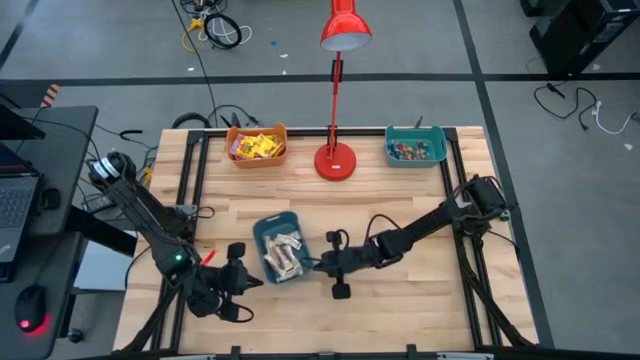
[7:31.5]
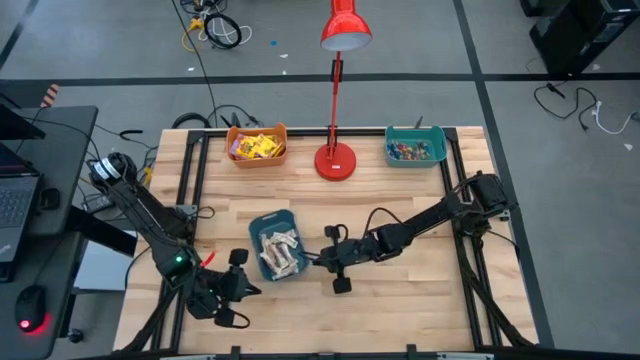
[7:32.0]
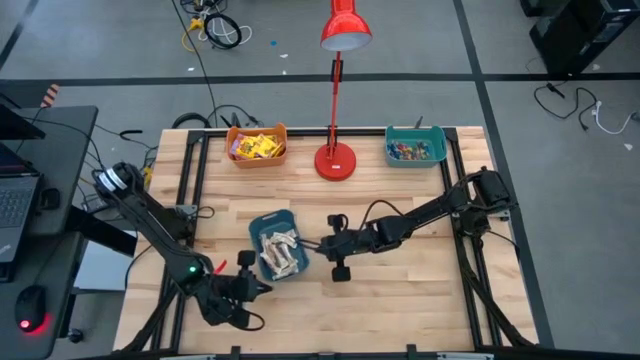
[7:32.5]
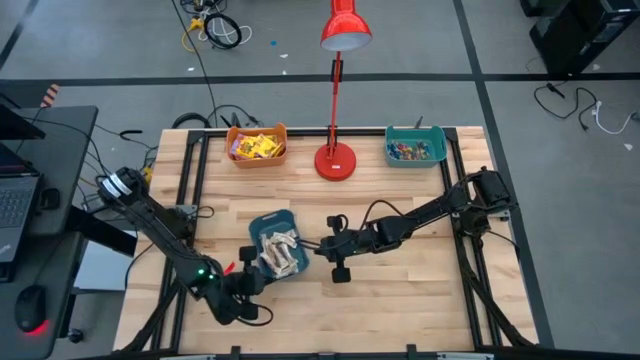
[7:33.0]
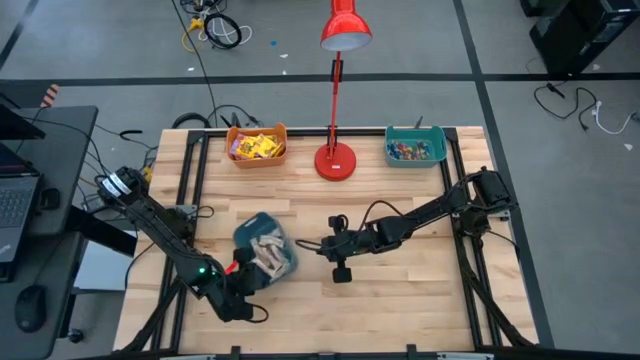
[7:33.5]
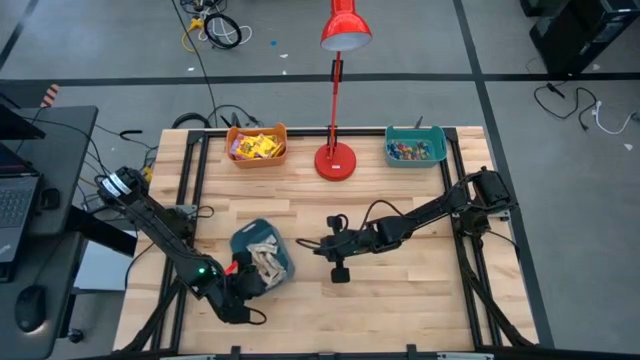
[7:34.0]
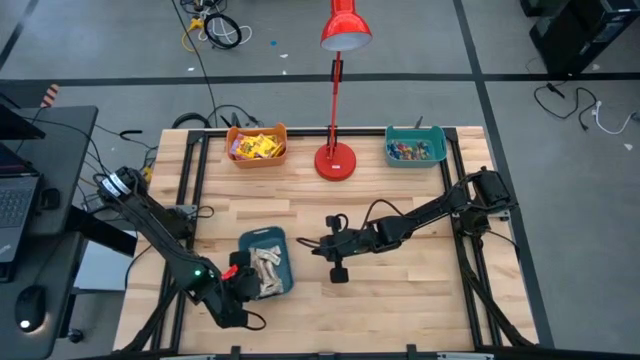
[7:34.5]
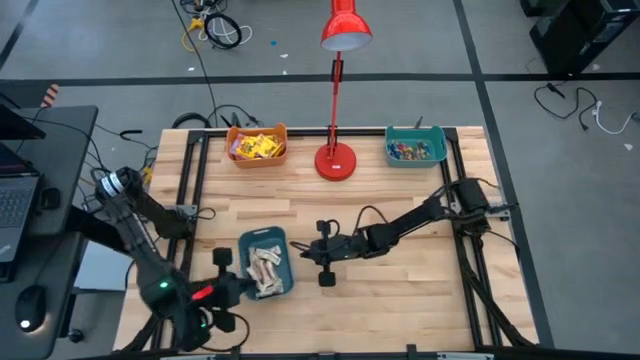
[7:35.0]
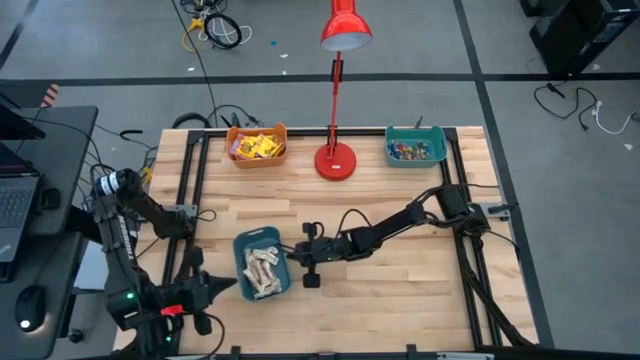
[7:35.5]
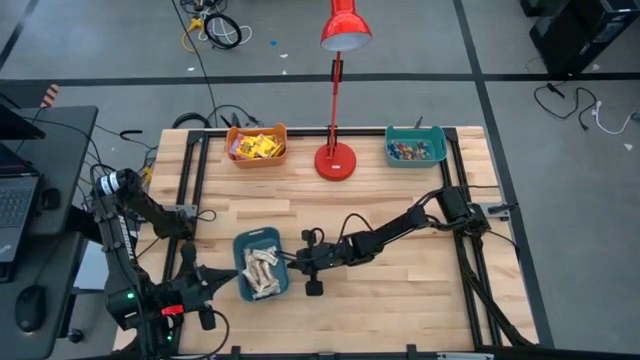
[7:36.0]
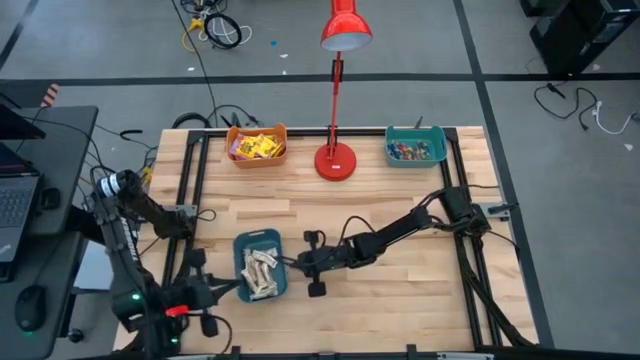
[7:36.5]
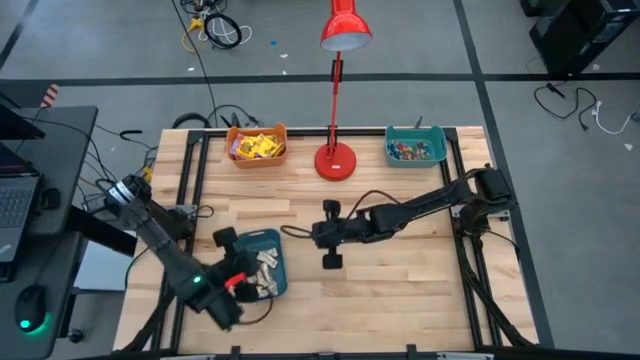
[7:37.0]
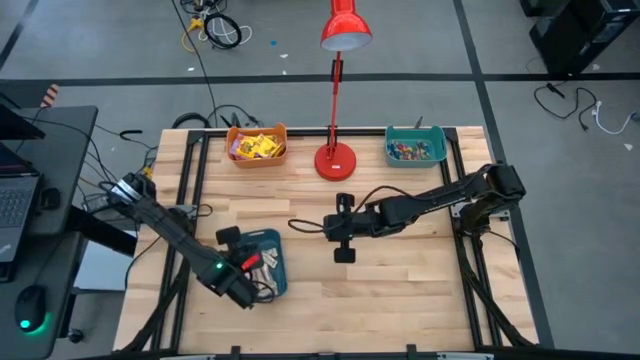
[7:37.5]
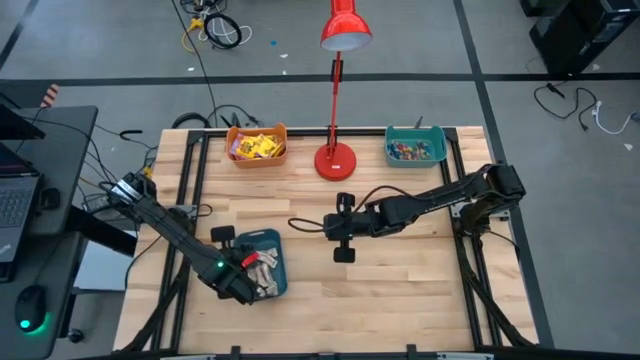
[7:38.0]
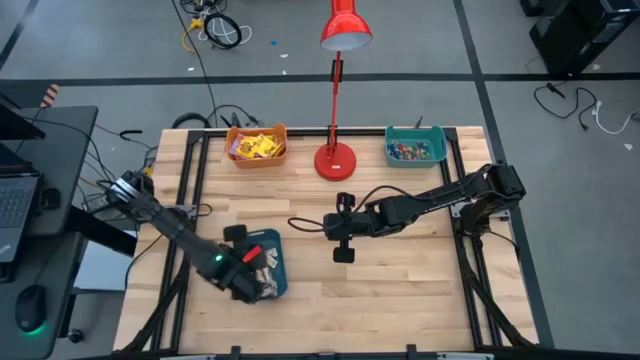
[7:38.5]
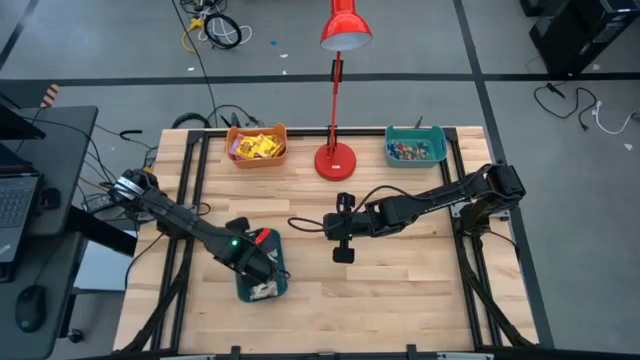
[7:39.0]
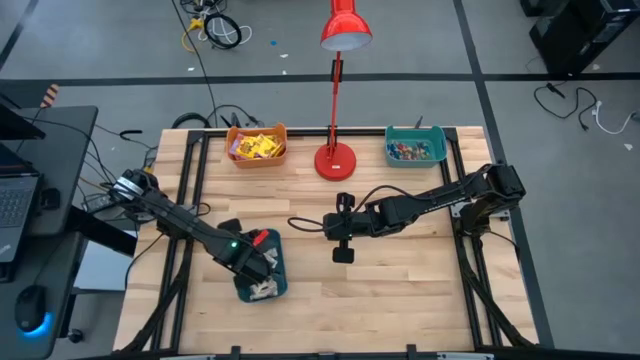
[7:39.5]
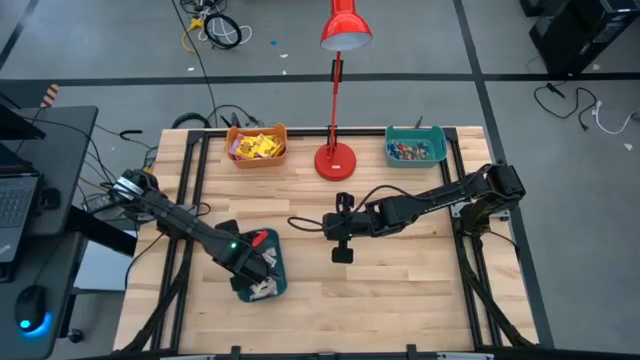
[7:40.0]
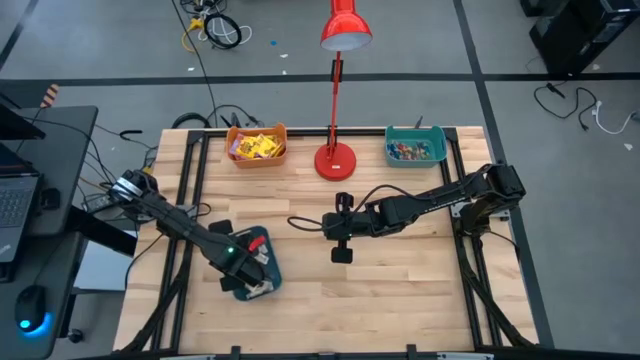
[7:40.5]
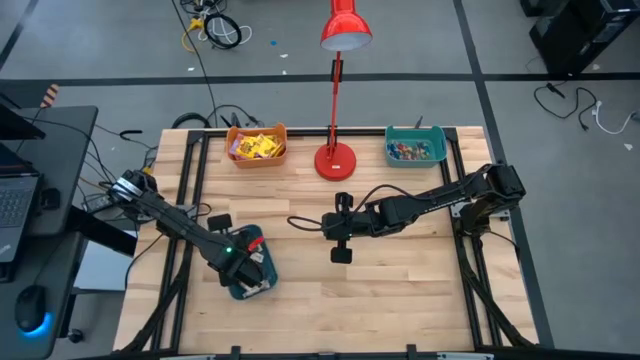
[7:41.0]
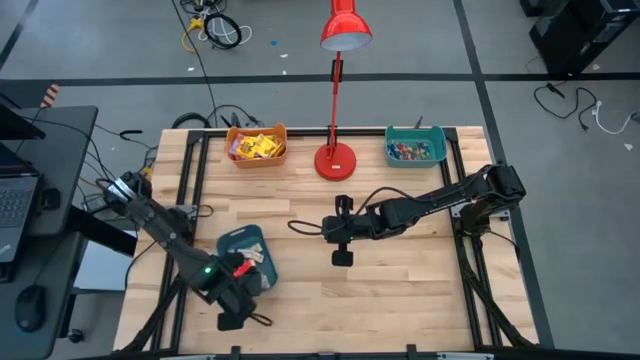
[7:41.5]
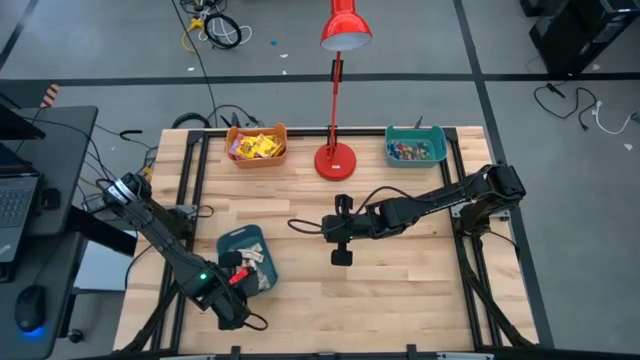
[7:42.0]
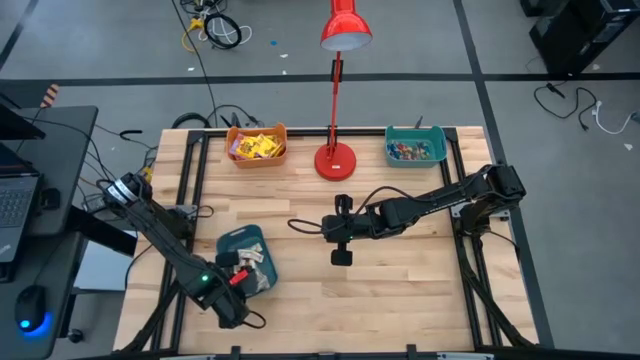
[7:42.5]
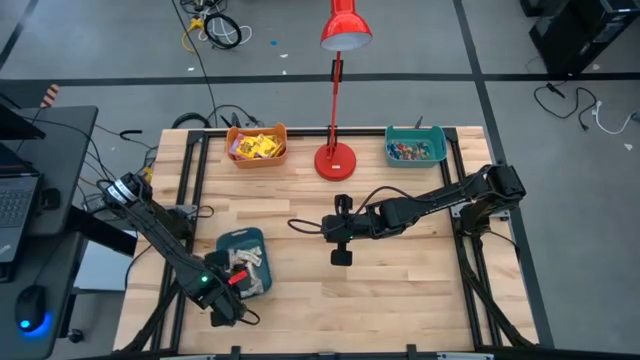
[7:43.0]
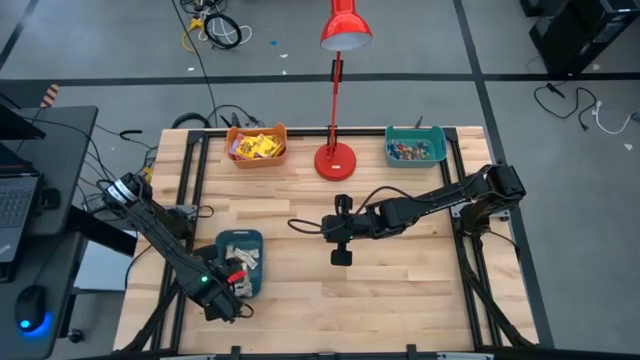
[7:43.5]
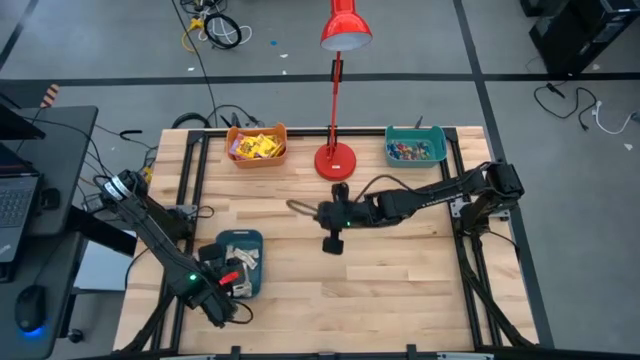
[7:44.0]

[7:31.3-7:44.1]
Task: Sort candy
Move the blue bin to the bottom left of the table

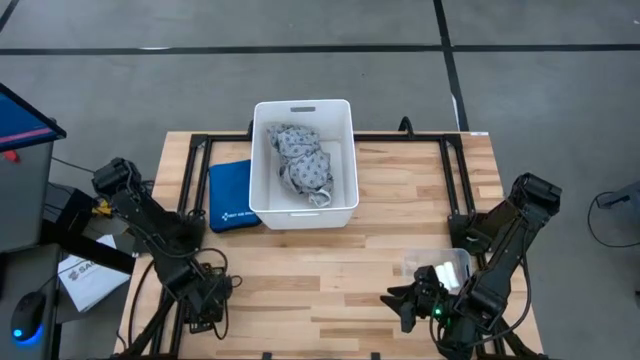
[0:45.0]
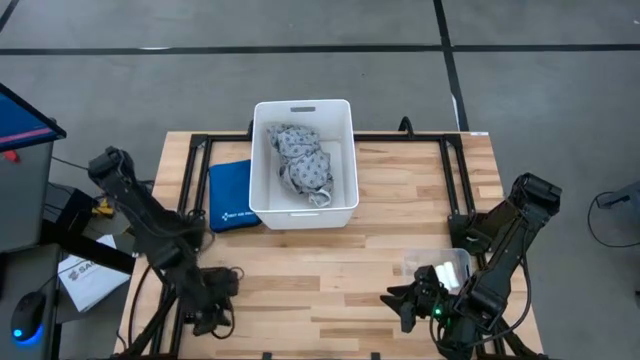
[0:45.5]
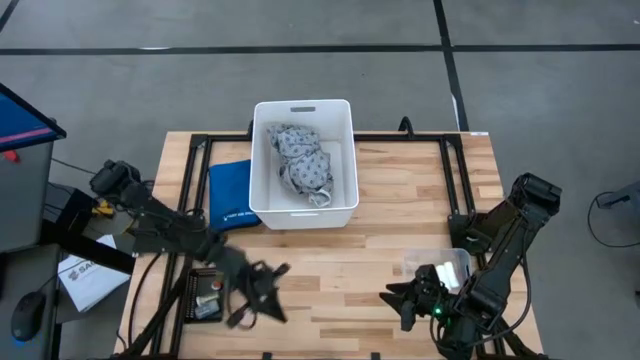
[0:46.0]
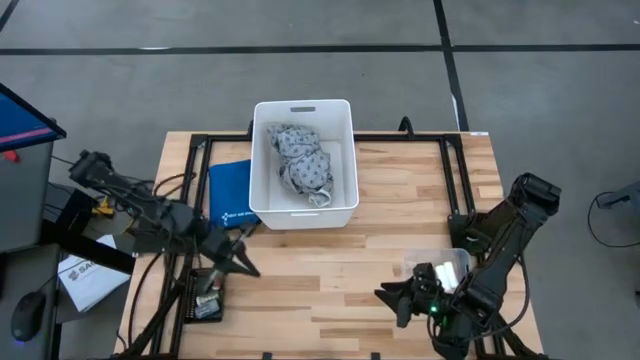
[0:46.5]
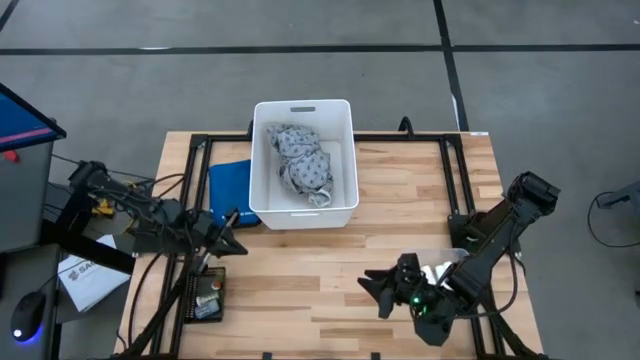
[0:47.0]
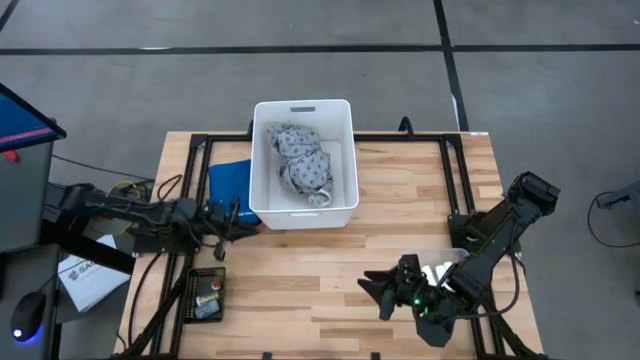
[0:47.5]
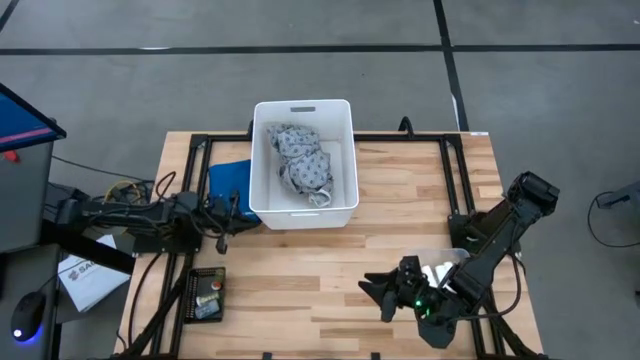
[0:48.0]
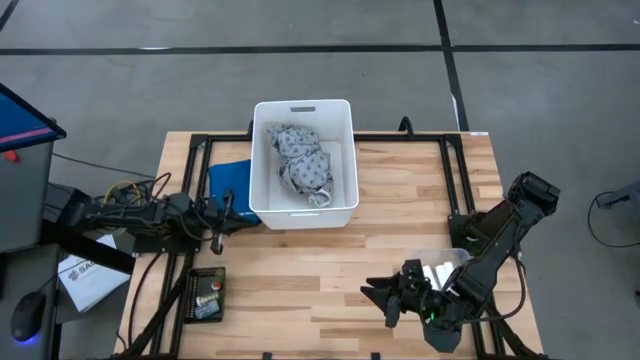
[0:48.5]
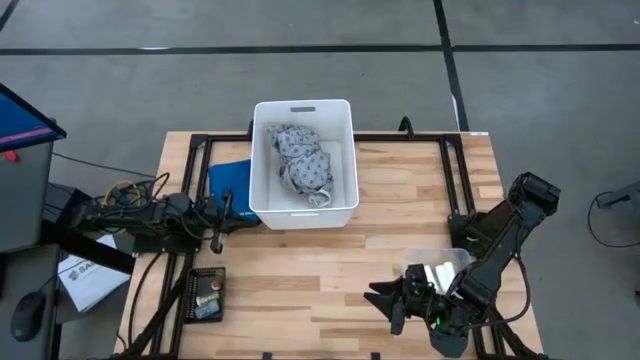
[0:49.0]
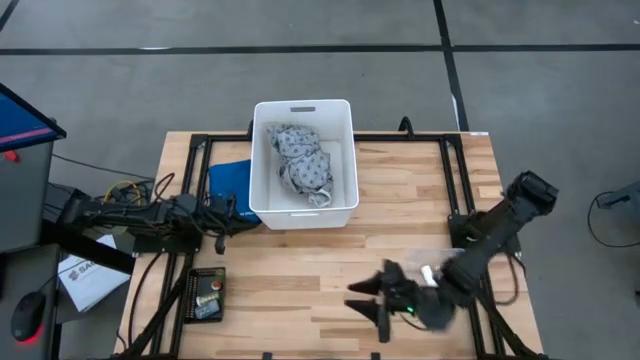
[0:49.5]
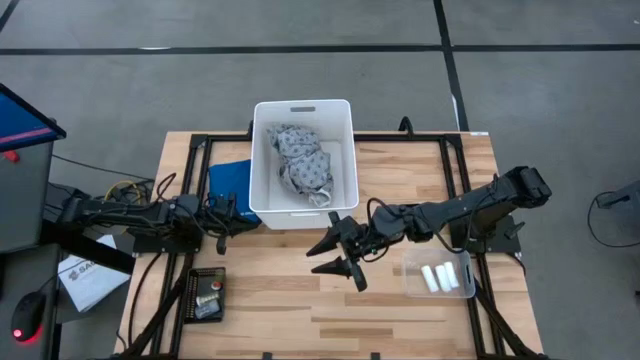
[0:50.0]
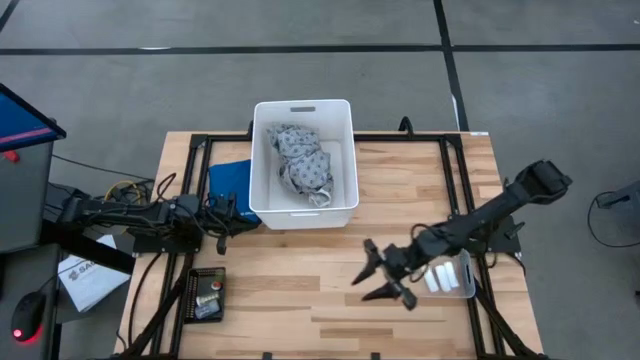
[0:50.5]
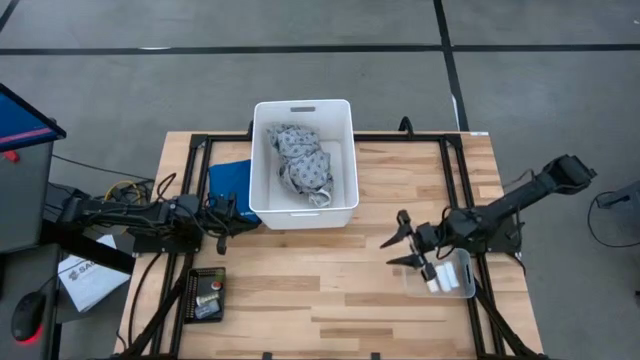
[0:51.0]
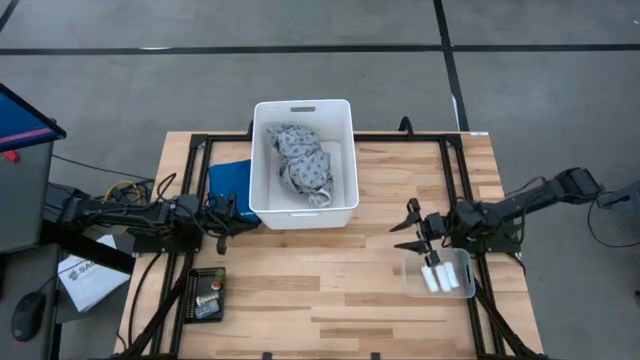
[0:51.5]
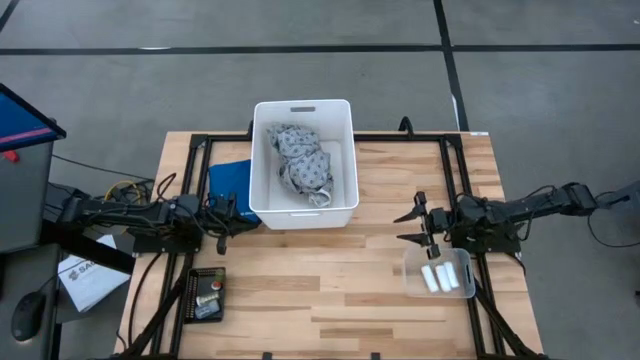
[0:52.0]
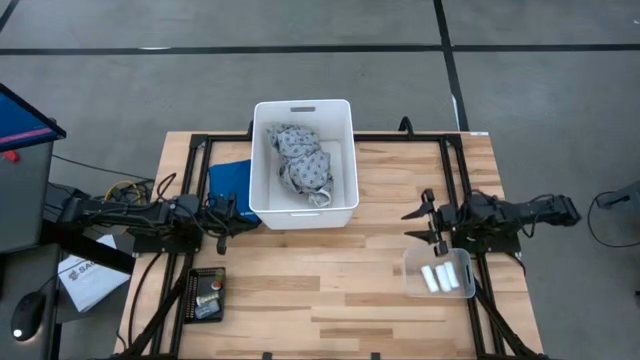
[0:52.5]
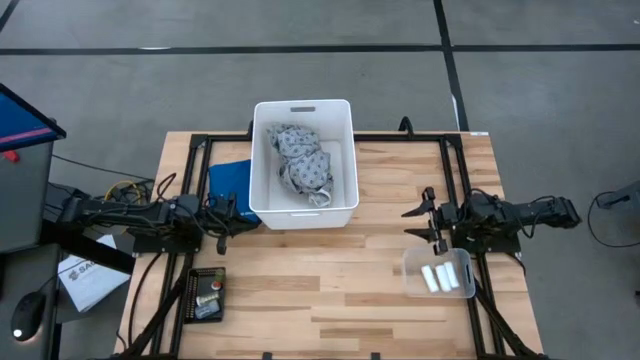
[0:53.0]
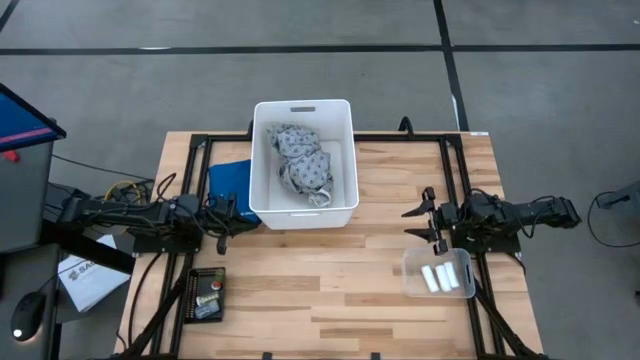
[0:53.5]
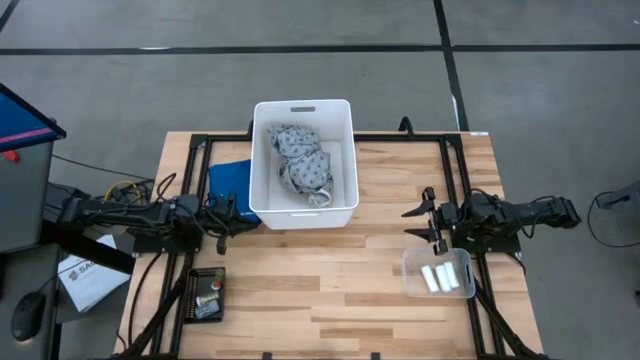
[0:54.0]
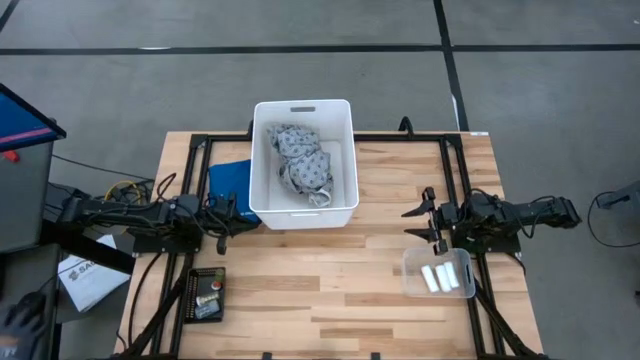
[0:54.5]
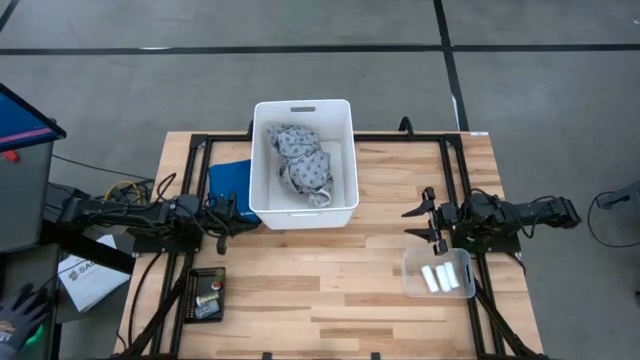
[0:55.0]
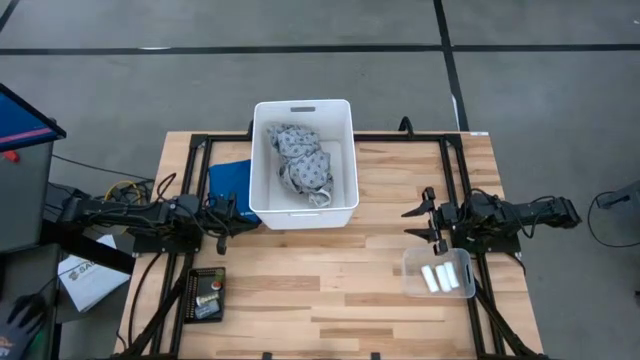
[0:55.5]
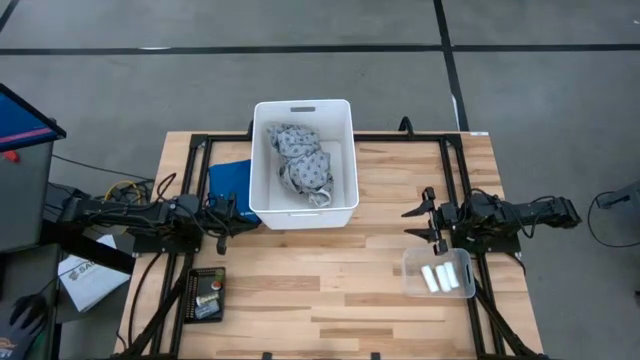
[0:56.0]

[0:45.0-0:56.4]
Task: Pick & Place Medicine items
Return to Home Position
